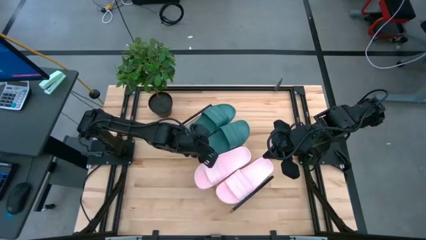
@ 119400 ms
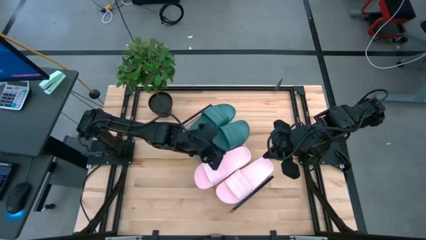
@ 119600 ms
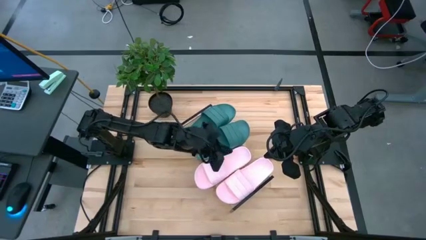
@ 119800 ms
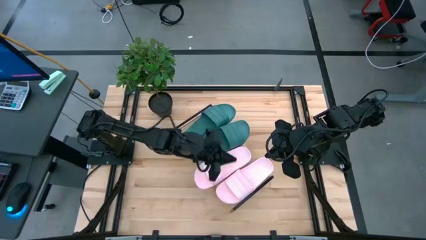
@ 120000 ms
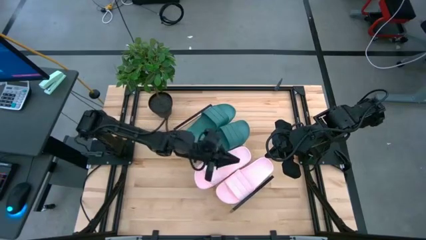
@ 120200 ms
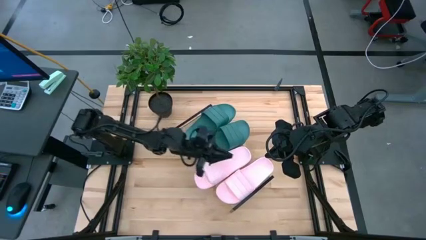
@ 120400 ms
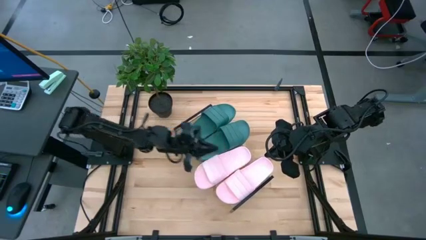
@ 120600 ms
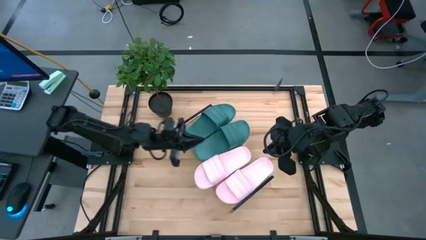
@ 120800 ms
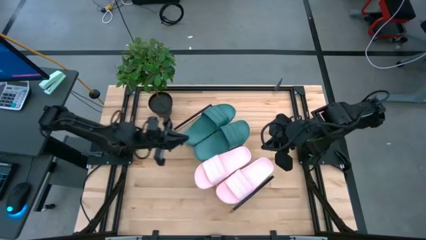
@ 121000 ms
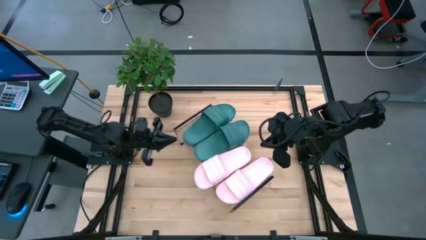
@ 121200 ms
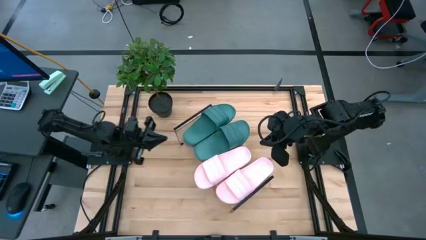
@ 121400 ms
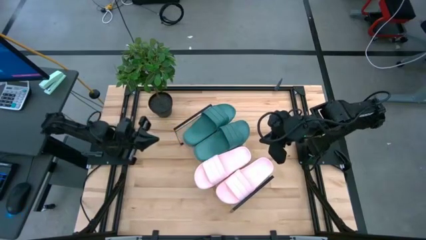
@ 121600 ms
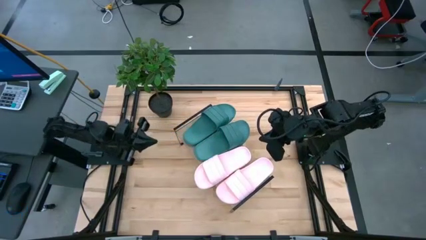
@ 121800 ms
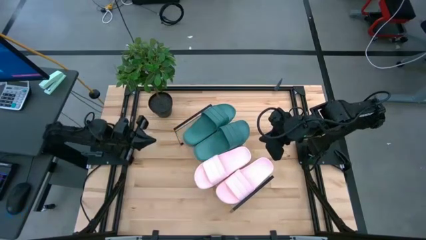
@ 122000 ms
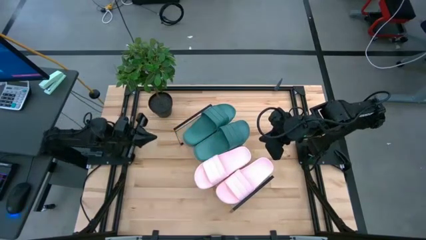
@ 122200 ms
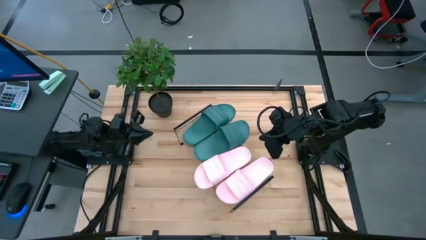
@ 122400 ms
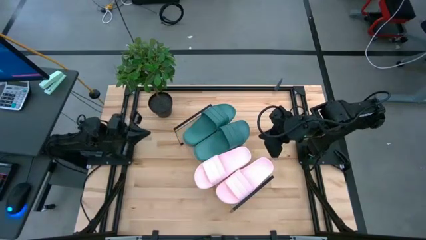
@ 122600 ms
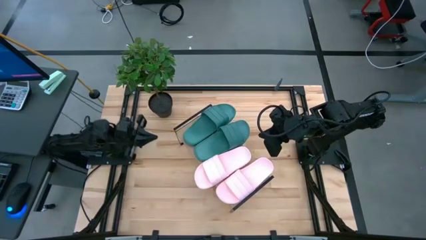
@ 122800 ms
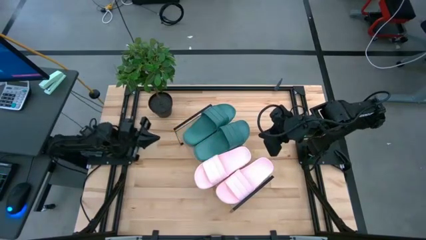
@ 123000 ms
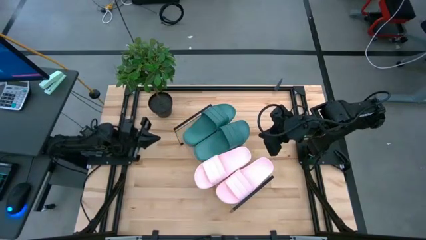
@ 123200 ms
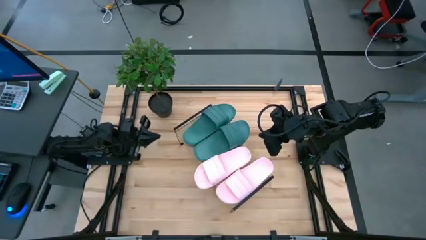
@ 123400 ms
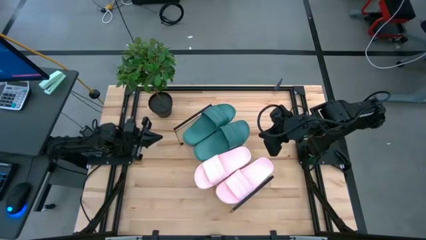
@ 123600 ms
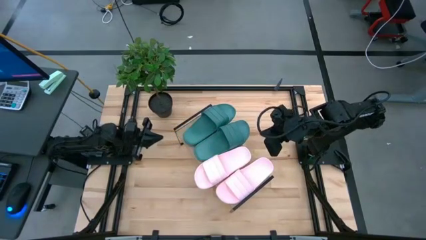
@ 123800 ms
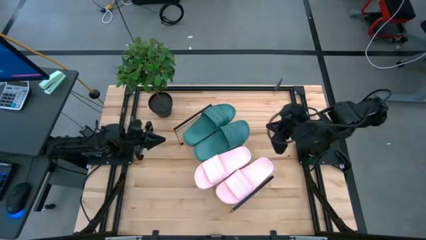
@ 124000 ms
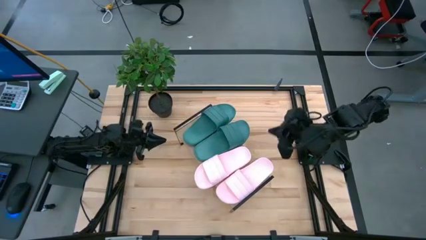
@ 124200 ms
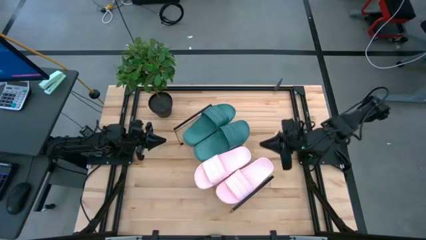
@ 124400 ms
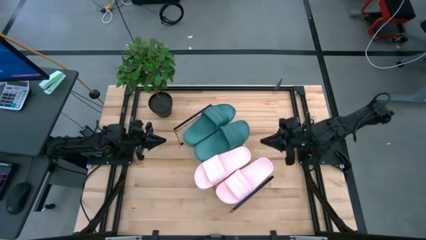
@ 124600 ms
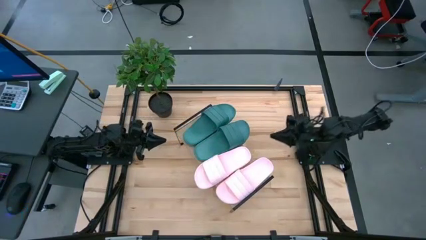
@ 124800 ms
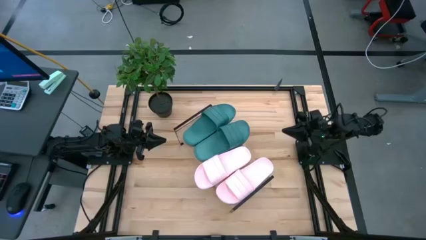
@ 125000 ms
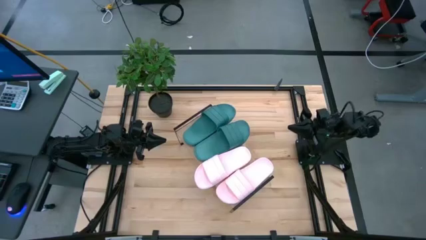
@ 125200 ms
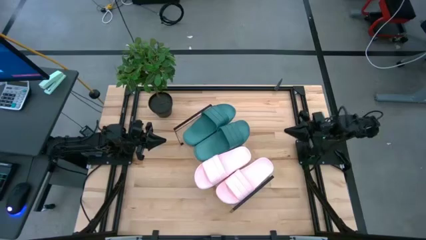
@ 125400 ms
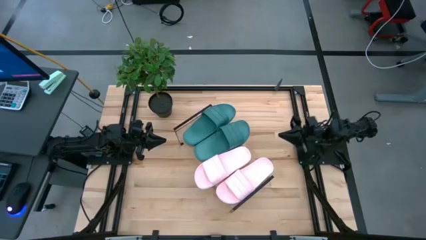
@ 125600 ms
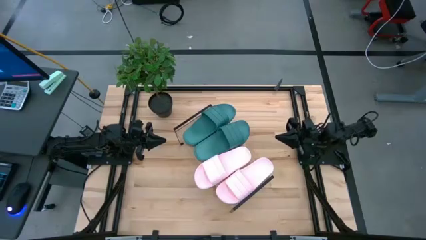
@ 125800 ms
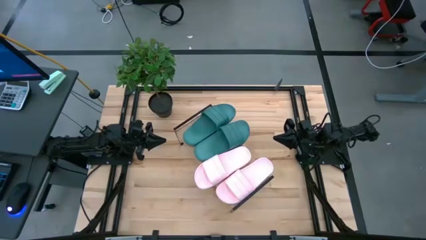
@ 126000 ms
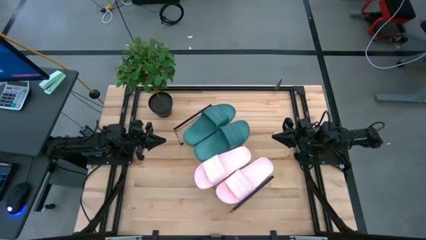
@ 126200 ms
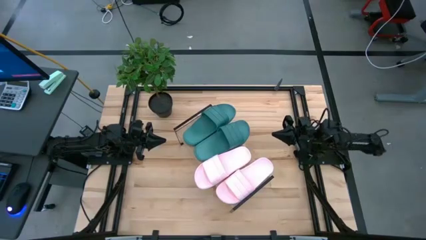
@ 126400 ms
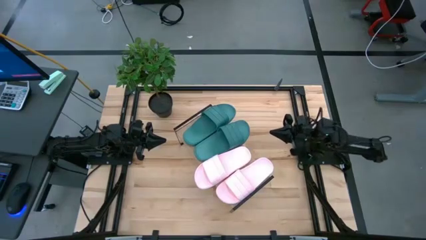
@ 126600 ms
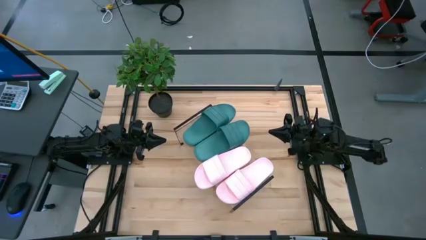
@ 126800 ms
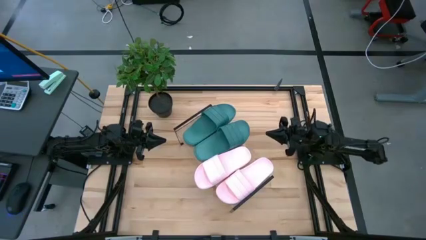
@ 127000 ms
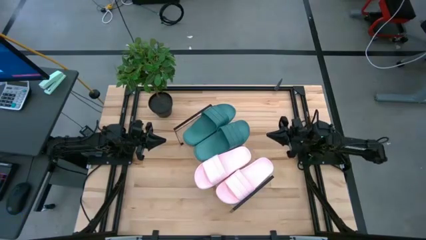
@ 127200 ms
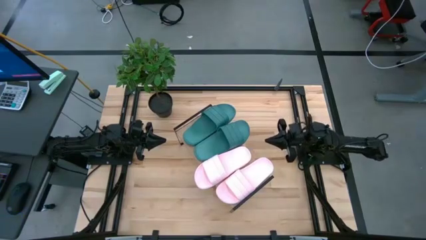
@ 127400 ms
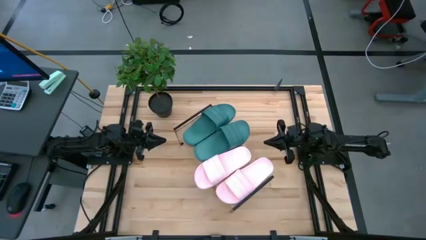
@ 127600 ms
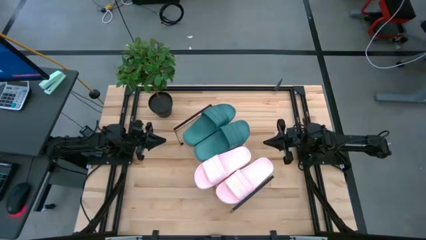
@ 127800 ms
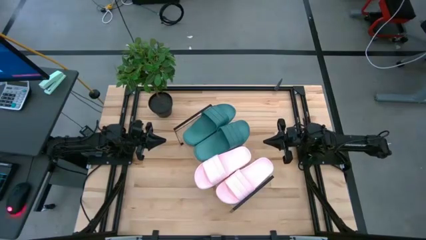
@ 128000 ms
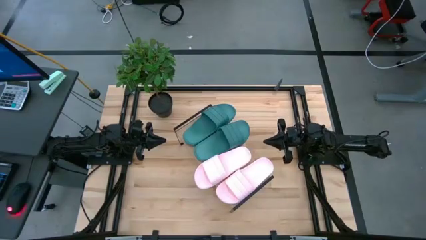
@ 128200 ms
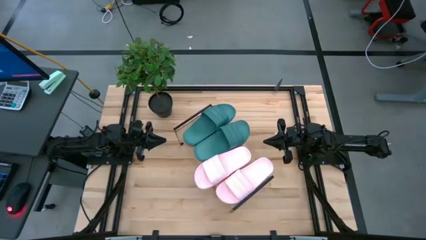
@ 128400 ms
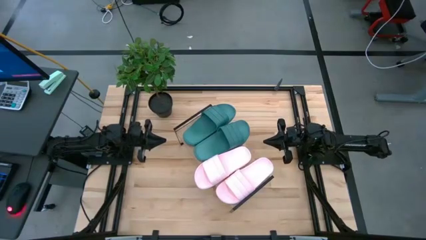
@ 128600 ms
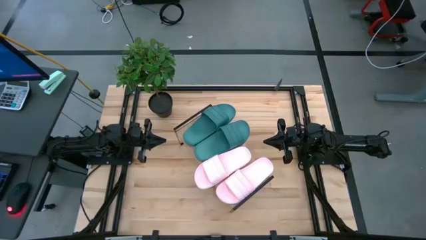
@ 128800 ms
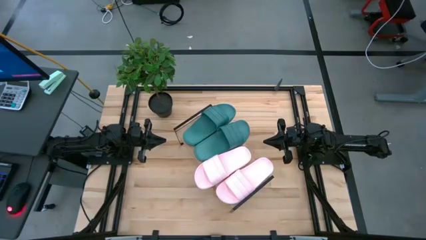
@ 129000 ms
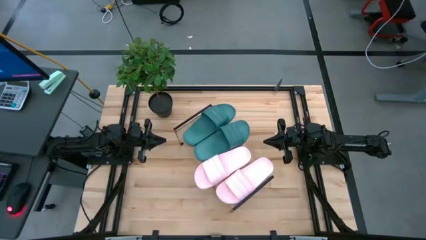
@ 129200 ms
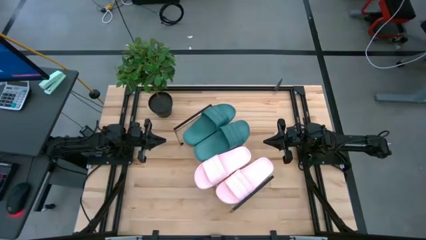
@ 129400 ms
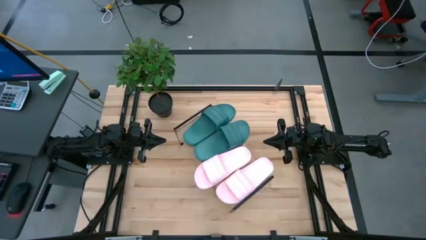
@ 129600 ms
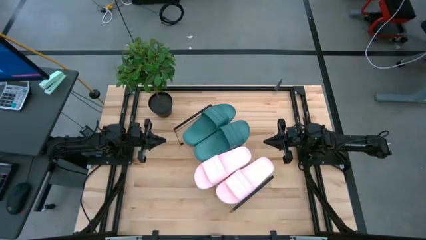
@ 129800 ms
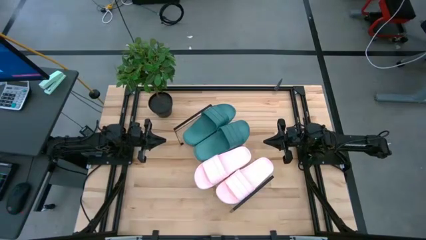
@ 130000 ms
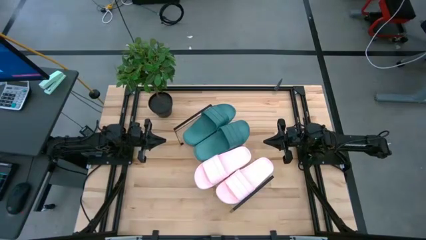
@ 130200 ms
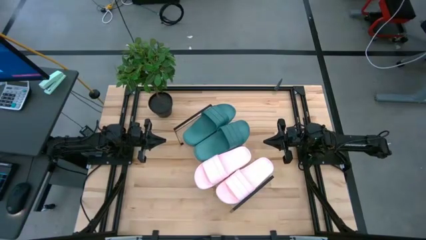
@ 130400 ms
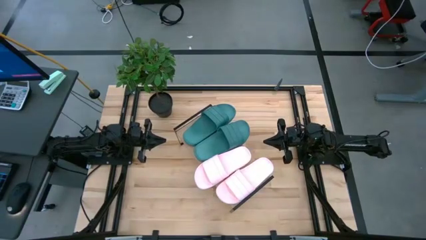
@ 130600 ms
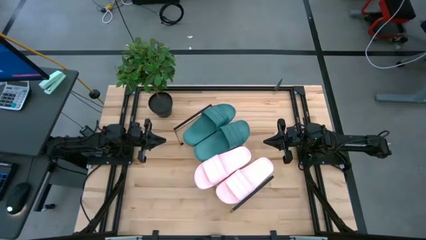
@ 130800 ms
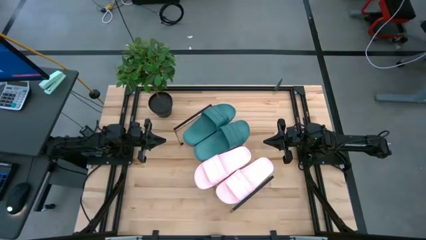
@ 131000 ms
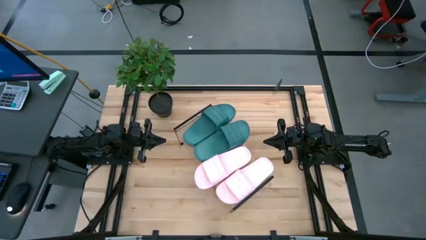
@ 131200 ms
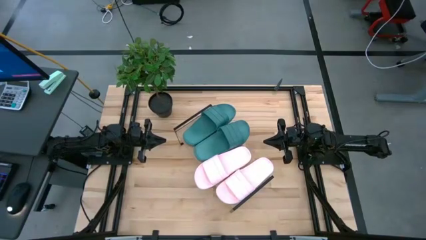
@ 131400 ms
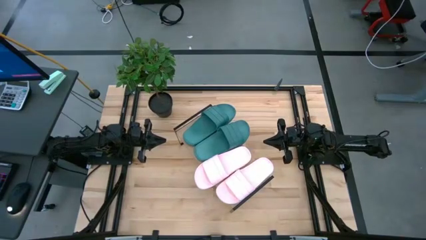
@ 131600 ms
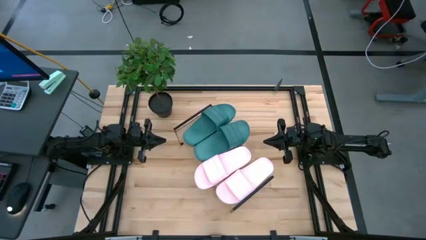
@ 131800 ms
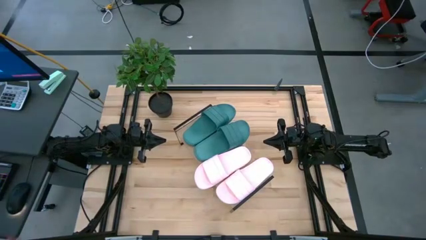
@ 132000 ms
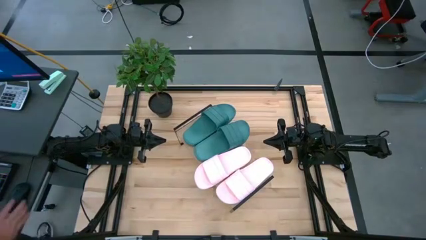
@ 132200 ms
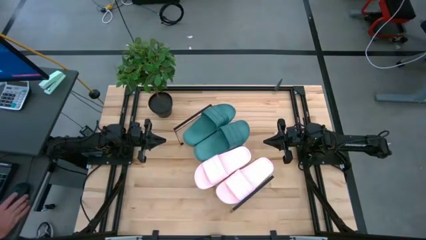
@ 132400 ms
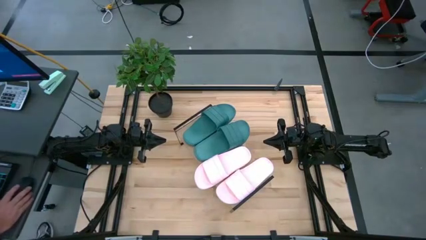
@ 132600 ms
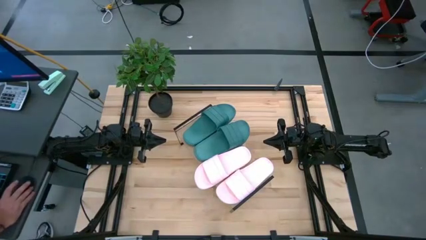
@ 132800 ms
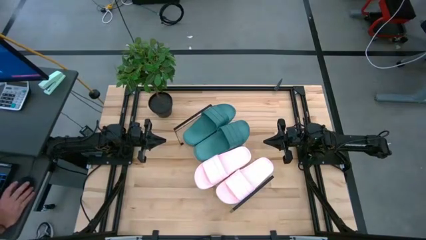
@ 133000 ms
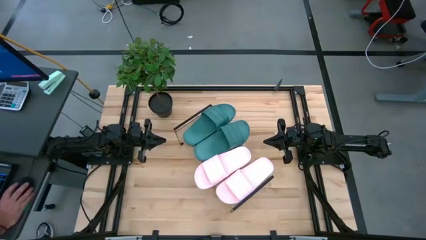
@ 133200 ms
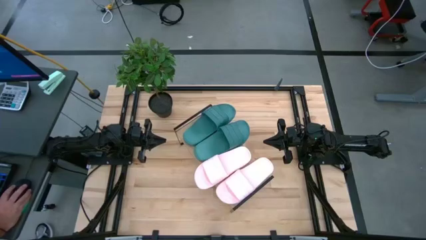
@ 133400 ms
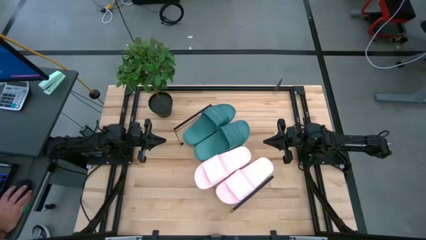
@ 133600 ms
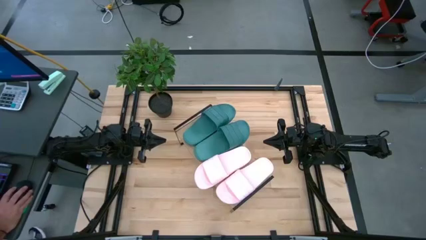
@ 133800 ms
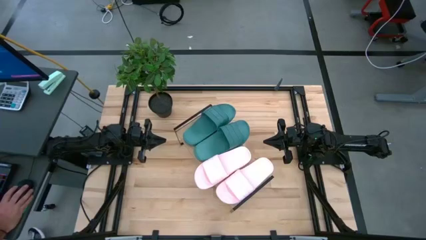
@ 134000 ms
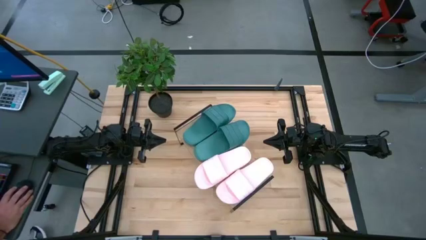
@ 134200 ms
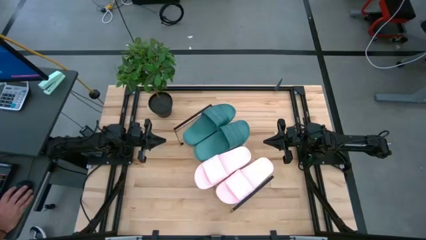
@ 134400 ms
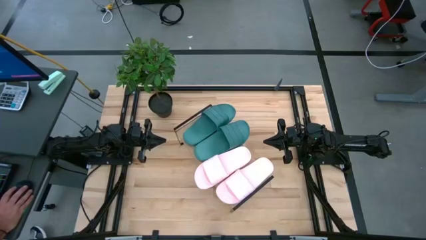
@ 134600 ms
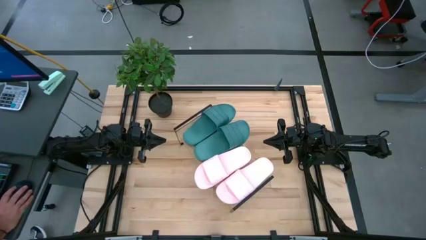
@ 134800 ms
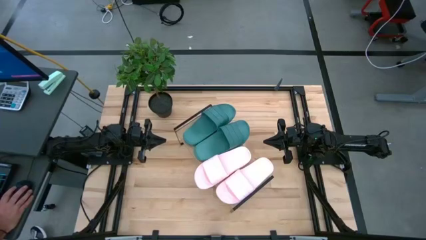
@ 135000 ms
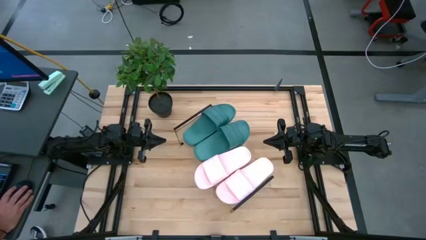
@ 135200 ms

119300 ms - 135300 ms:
Task: Pick and place slides into the shelf
Return to Home Position

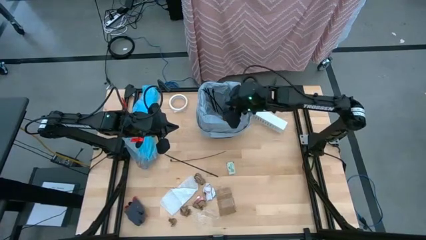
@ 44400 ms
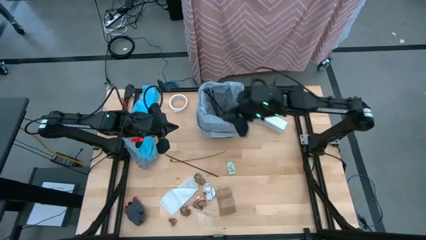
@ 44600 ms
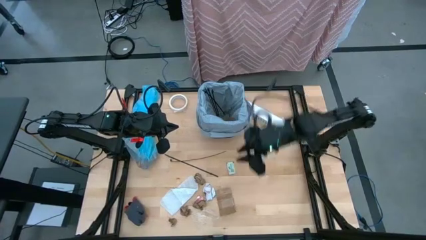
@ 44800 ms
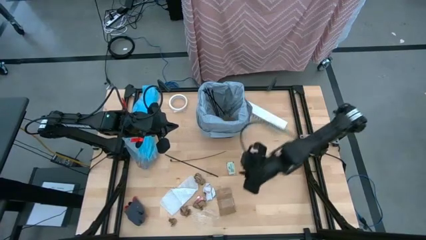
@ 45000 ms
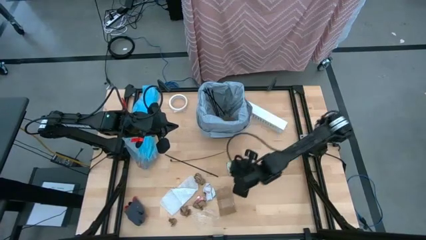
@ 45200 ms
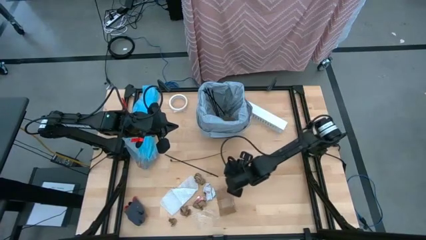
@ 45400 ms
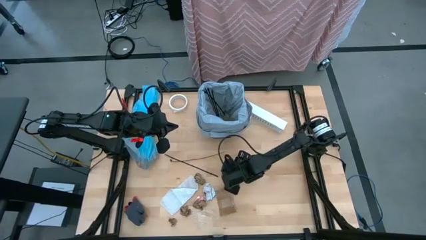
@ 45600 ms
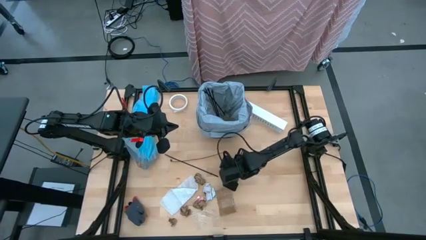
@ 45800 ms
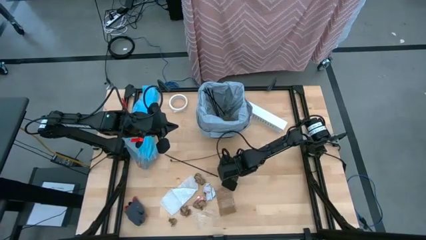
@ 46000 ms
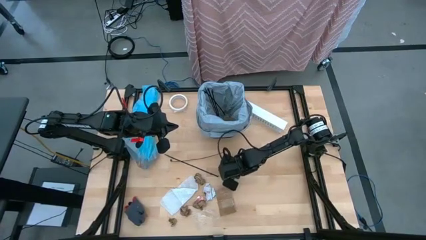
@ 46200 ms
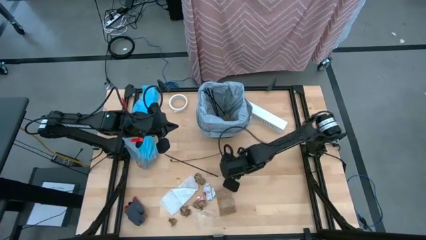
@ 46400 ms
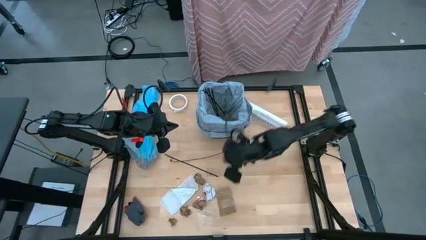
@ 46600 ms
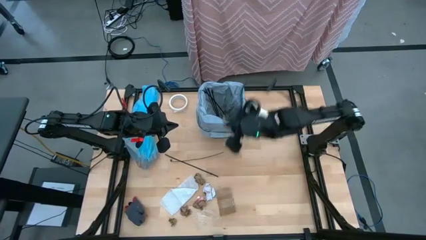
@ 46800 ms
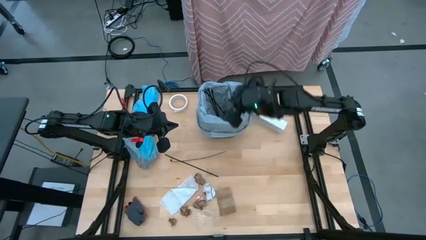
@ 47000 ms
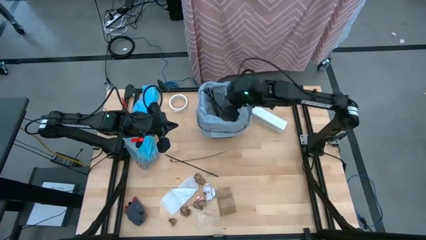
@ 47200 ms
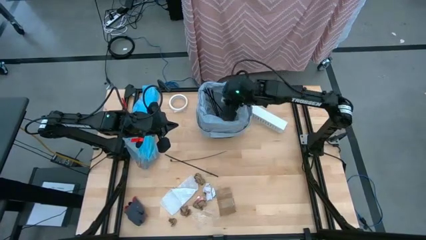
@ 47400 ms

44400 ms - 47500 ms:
Task: place trash/remove bag and relplace
Put the stevia packet into the trash bin
